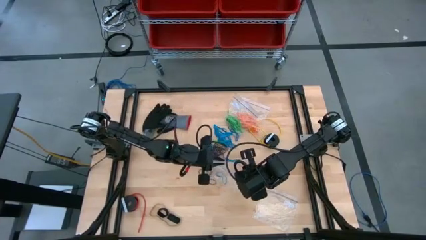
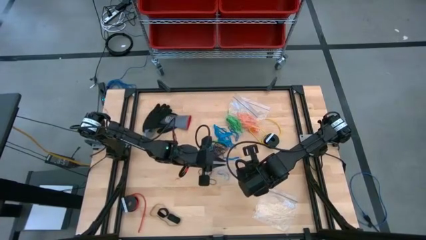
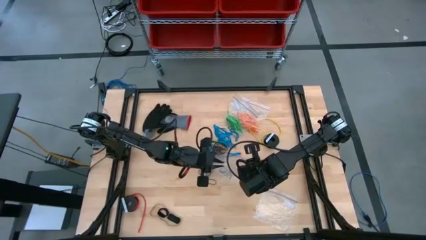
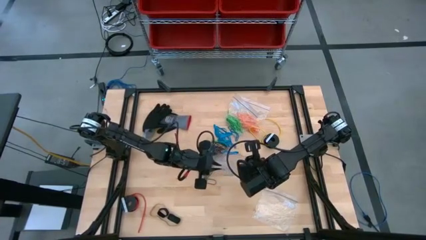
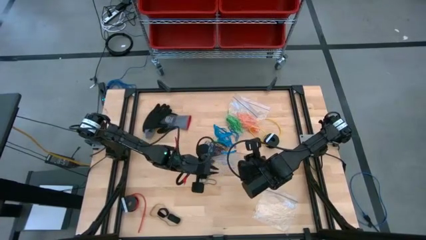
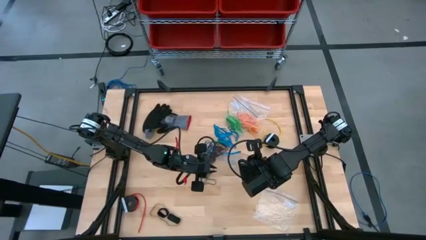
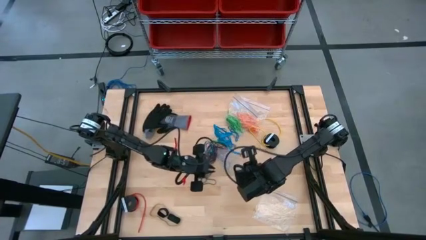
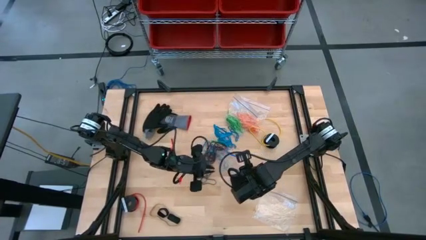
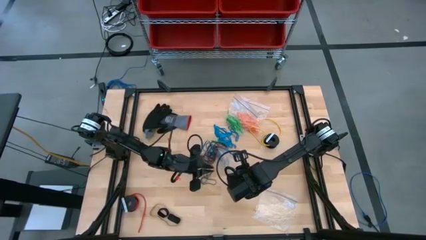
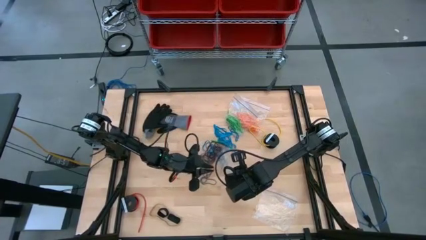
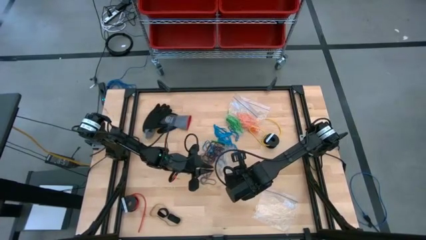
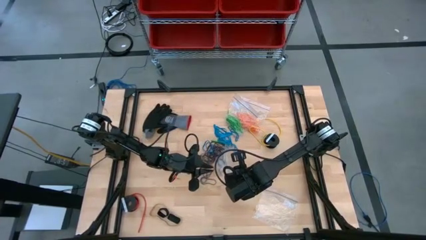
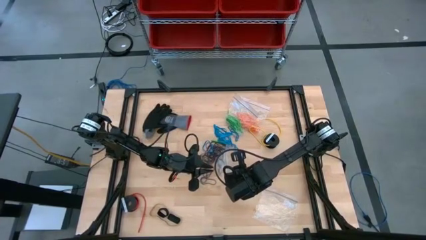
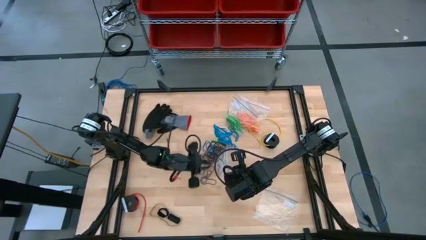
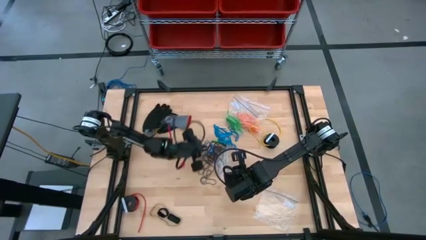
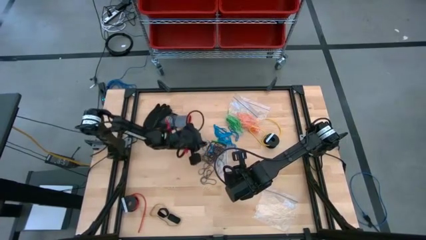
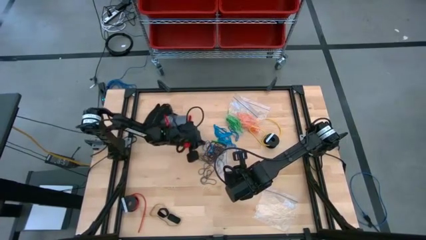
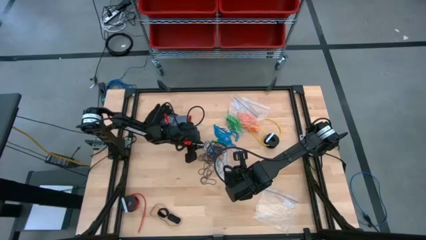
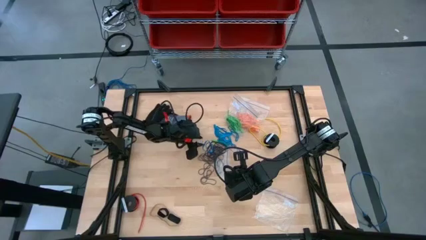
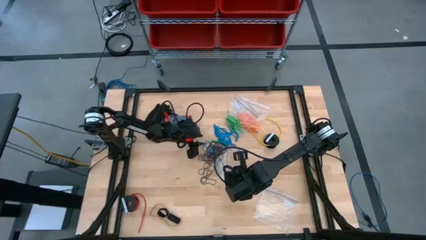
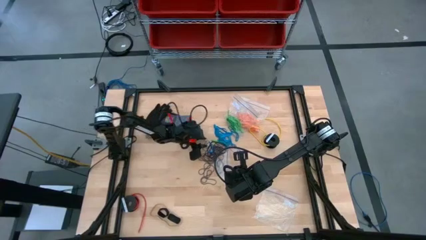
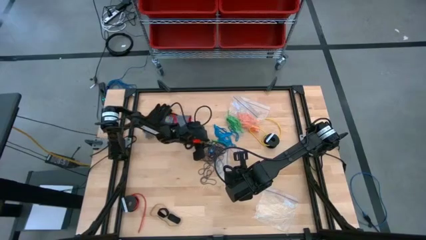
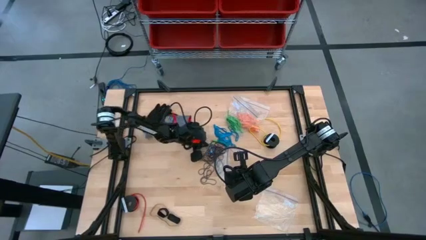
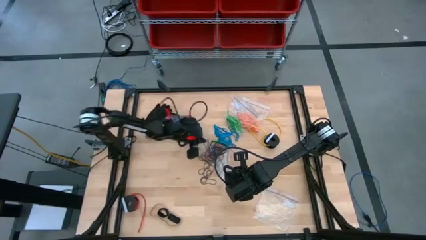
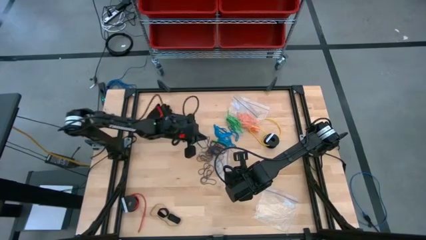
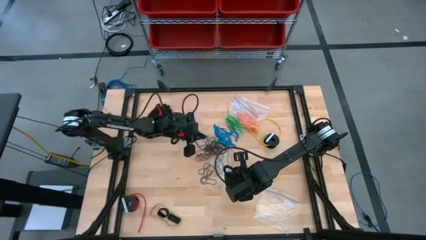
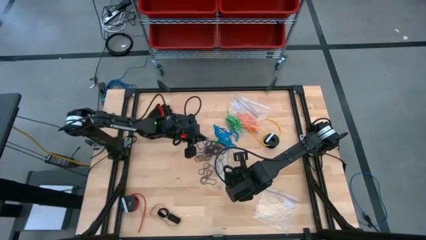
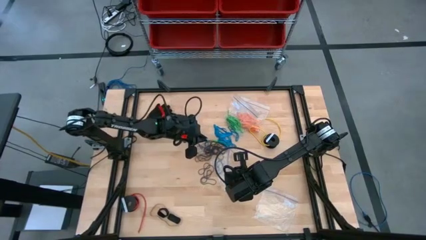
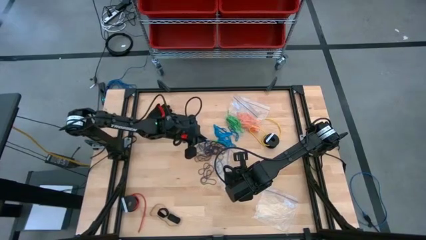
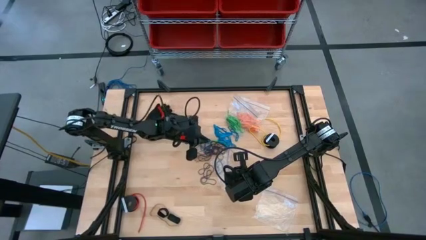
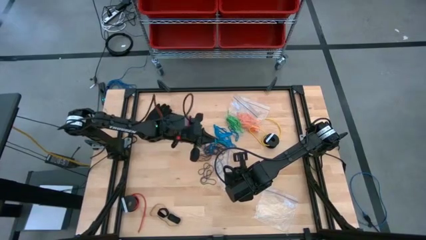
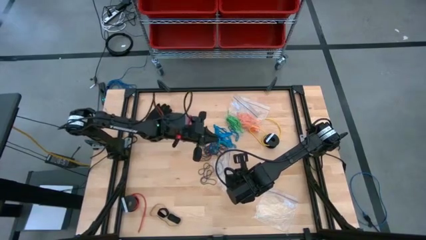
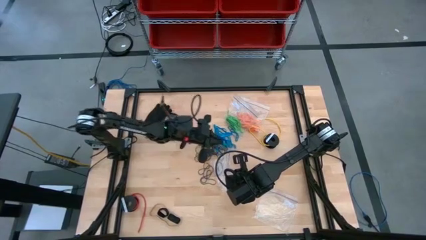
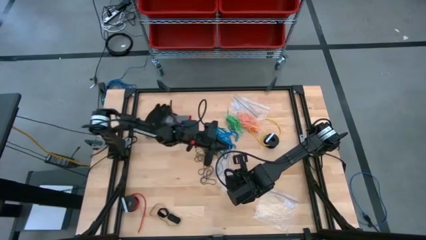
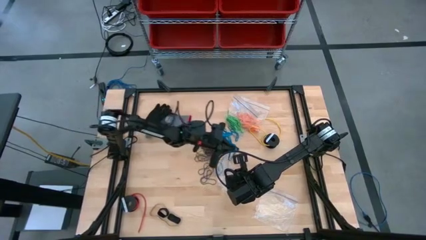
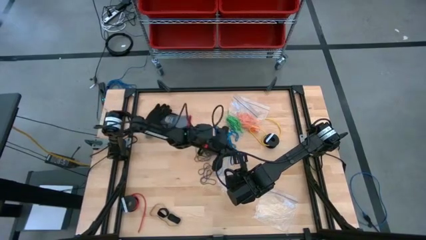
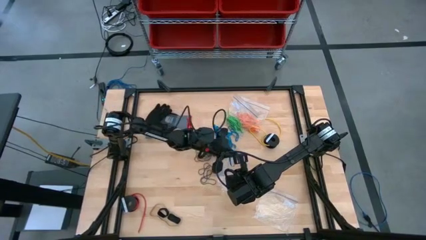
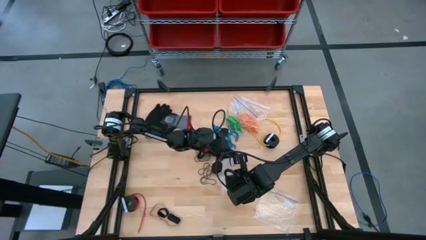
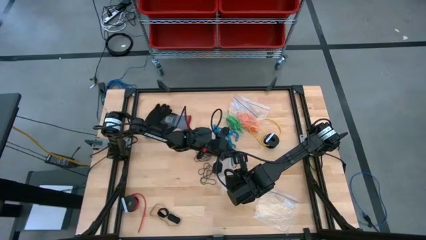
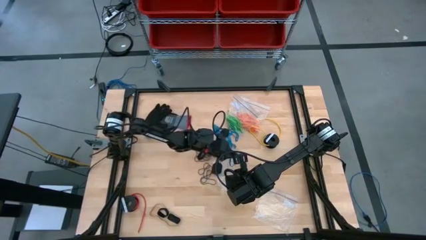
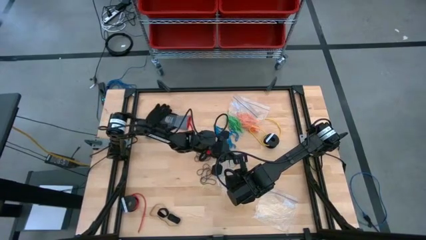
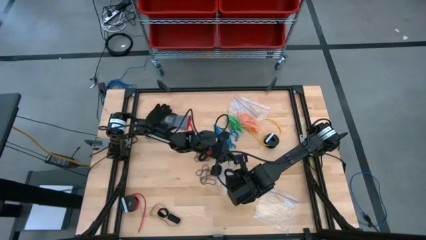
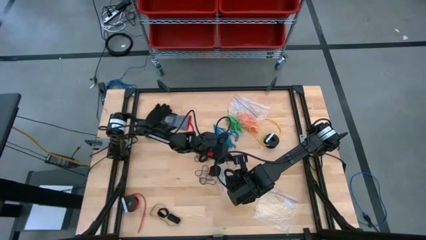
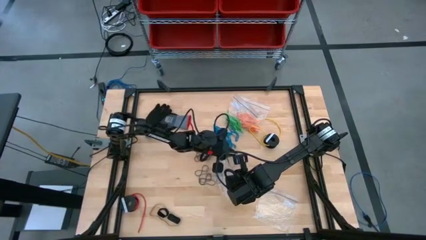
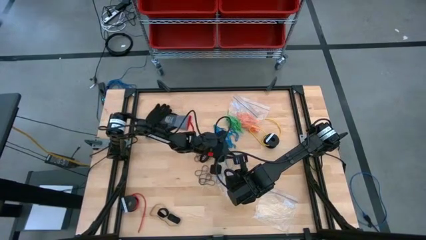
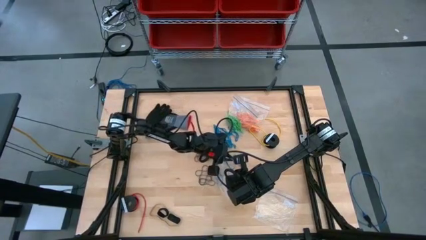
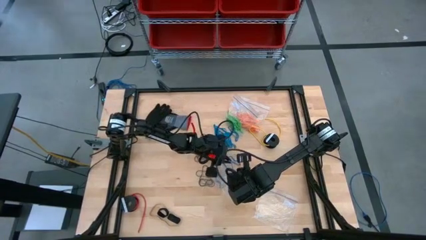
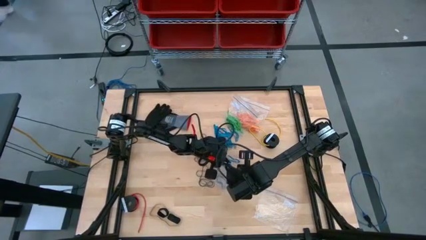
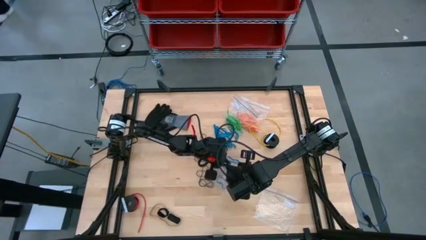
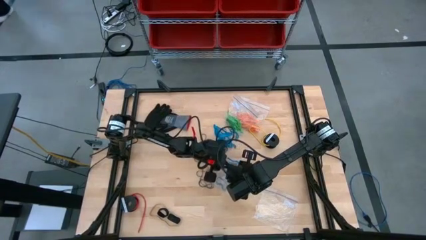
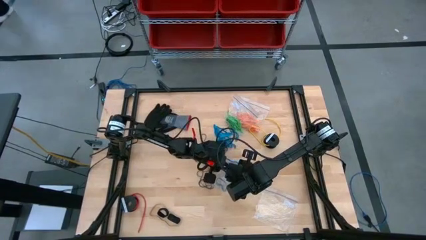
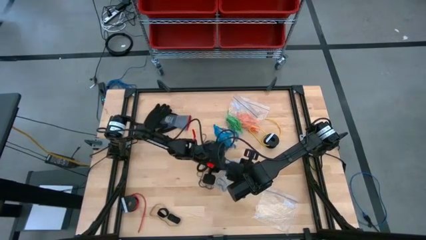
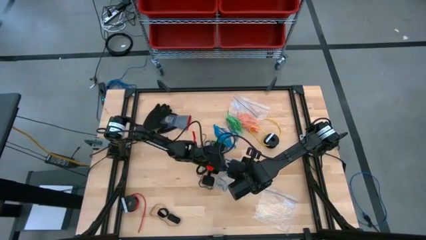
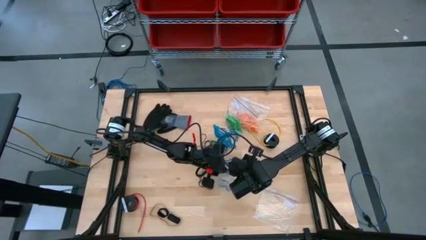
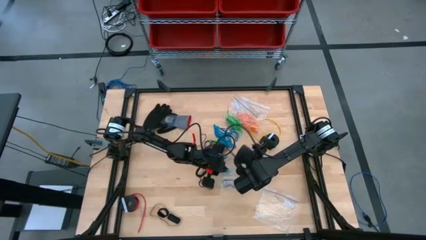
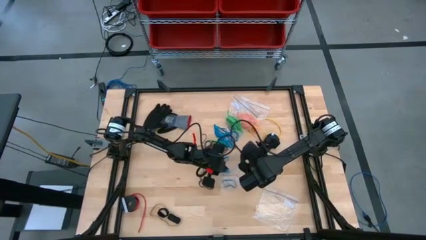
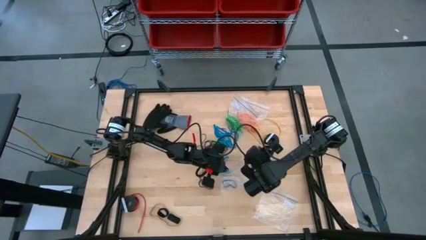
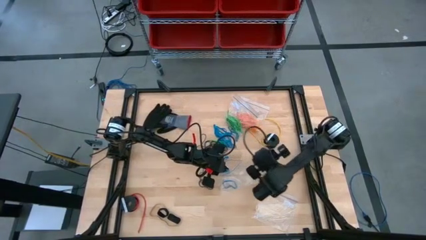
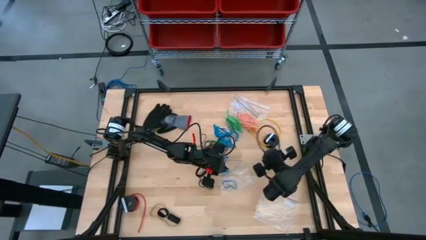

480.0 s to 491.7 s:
Task: Sort rubber bands
Put the blue rubber band into the transparent zip bag

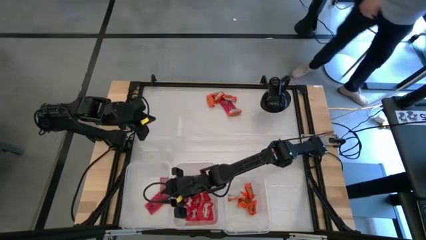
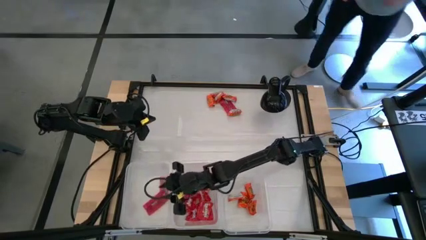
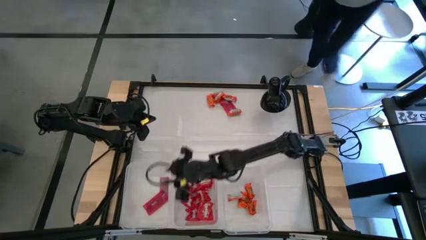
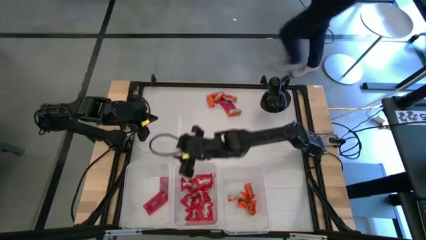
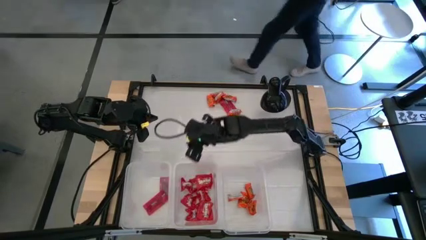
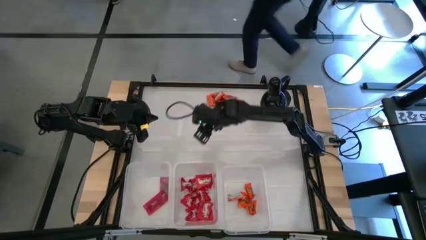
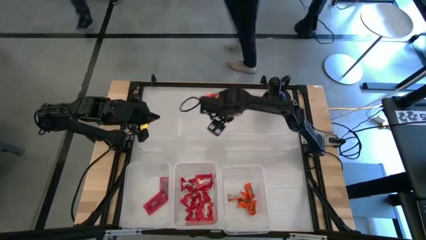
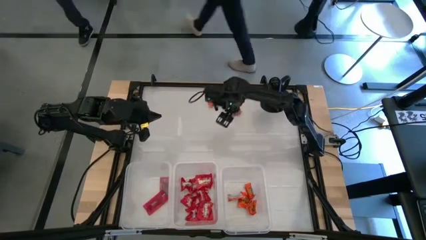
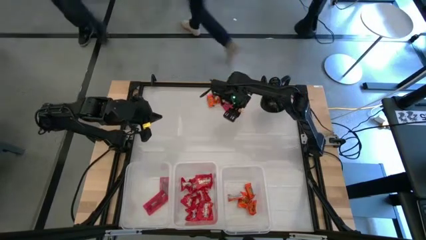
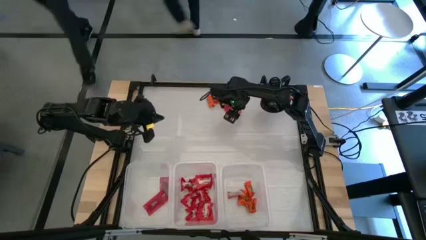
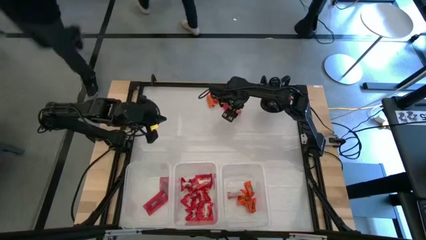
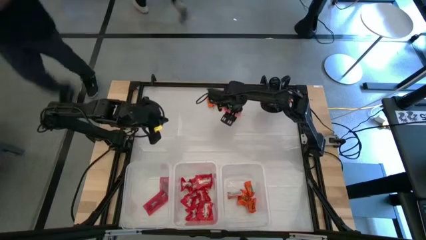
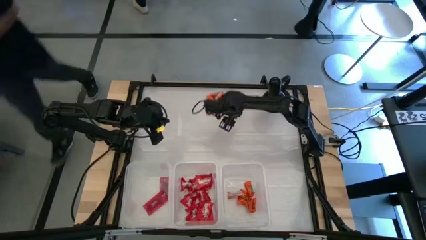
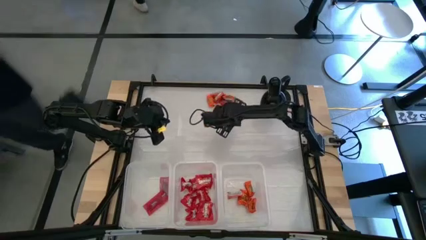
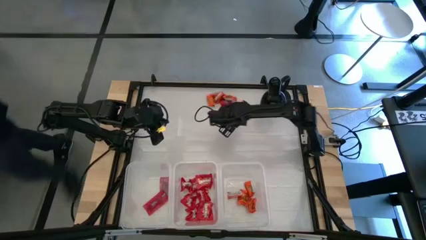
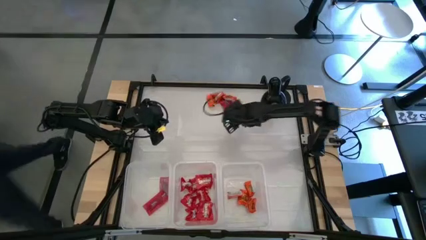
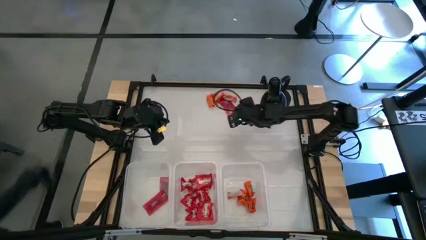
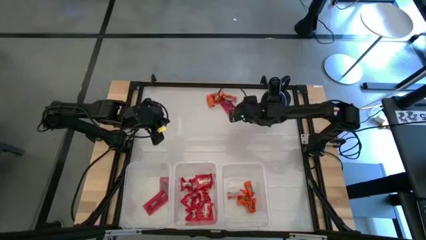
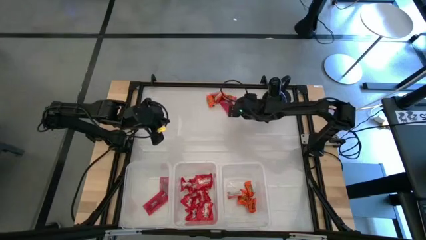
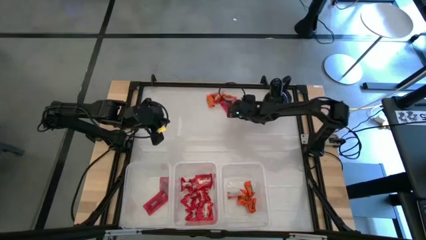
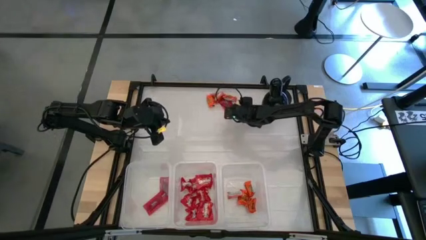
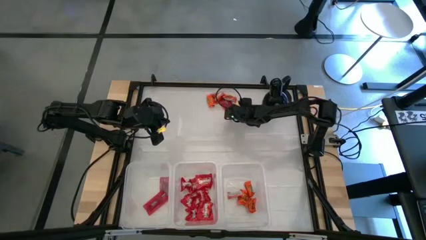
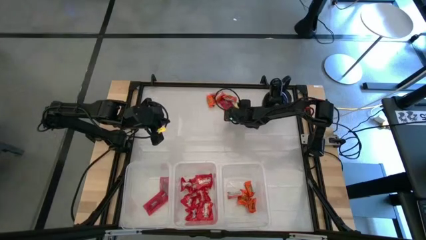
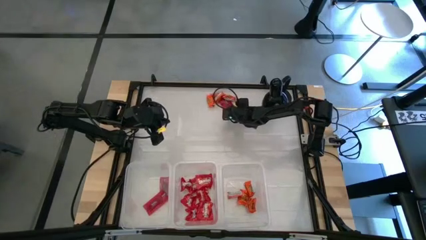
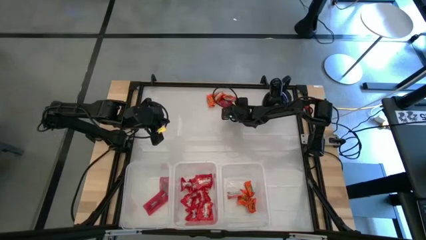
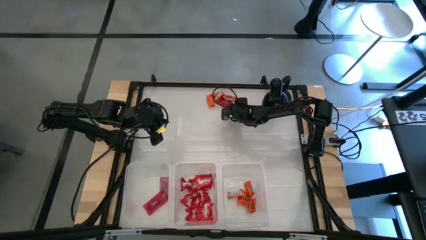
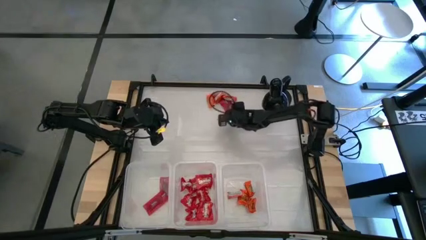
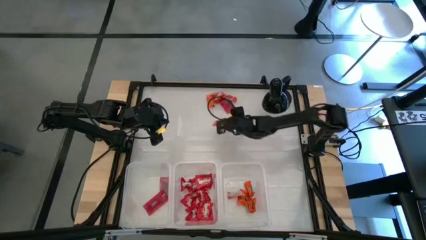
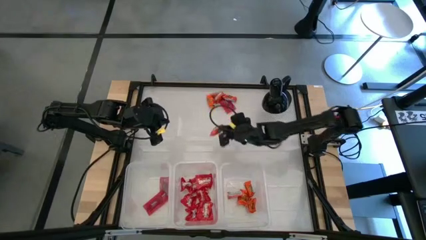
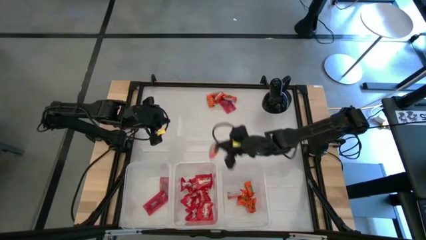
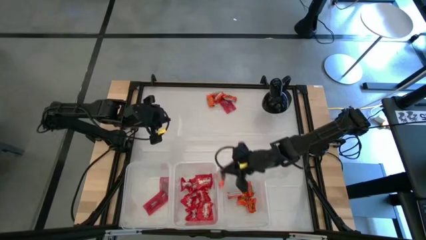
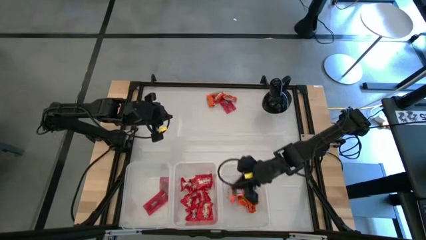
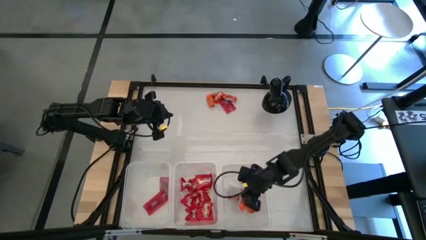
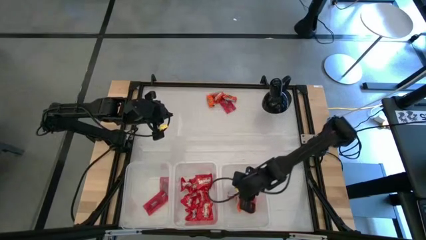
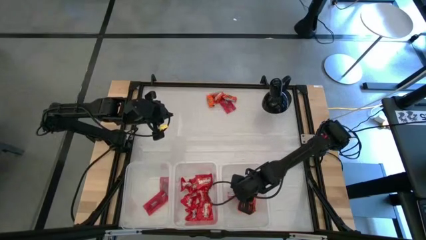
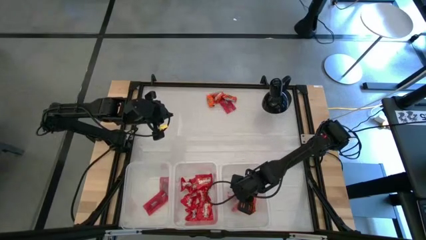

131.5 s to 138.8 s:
Task: Sort candy
Put the orange candy into the right transparent bin
